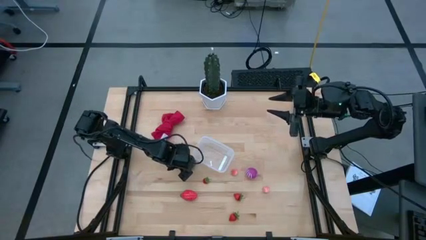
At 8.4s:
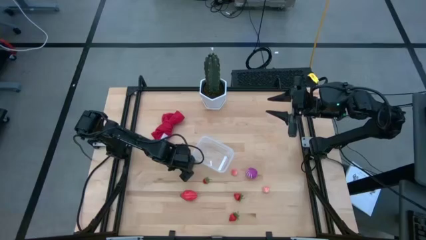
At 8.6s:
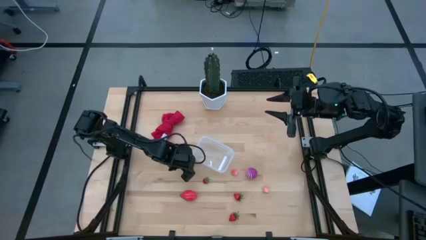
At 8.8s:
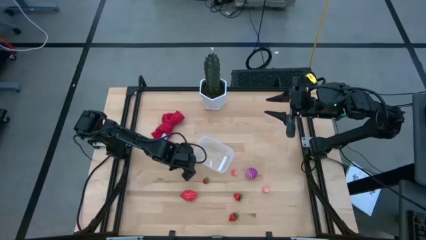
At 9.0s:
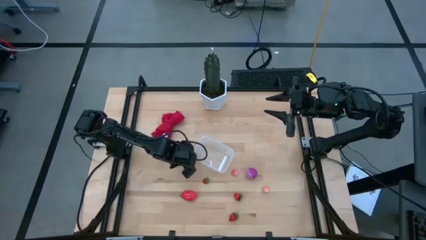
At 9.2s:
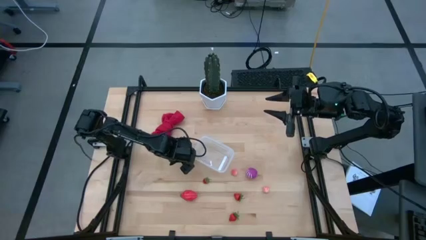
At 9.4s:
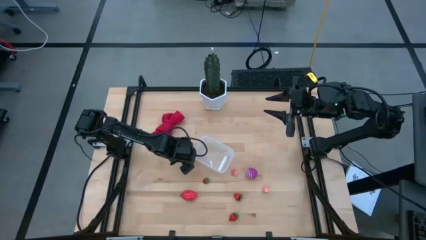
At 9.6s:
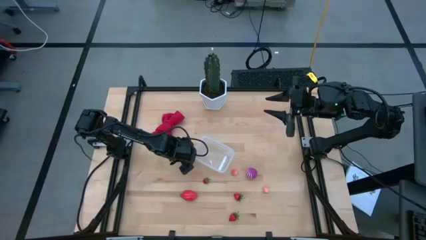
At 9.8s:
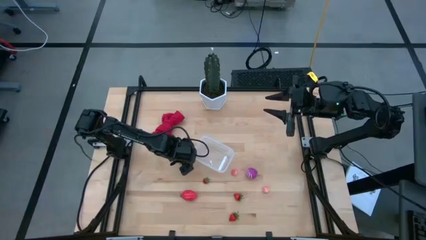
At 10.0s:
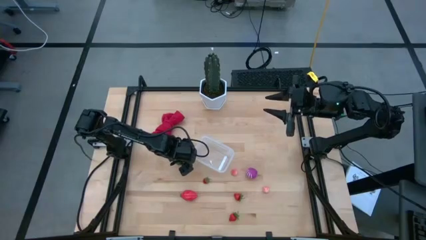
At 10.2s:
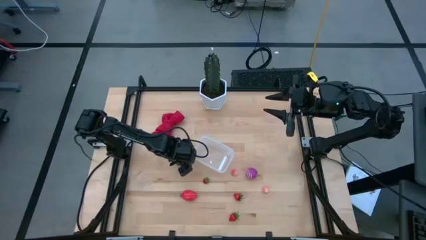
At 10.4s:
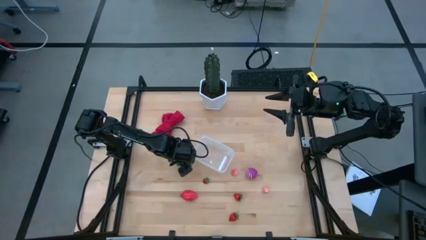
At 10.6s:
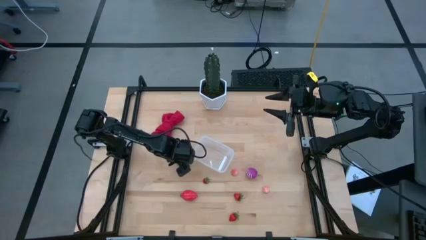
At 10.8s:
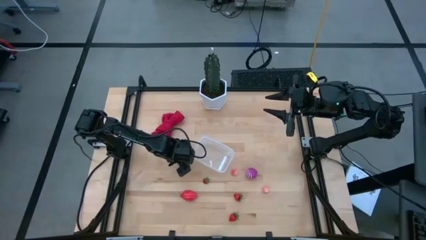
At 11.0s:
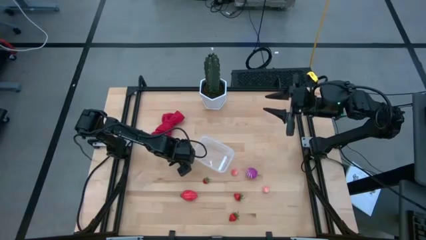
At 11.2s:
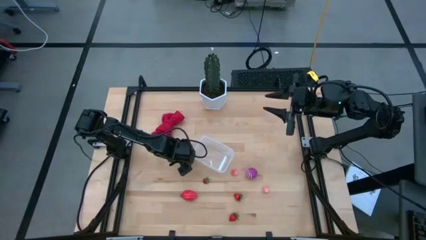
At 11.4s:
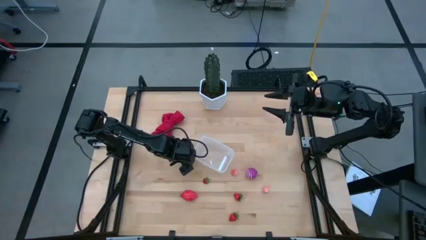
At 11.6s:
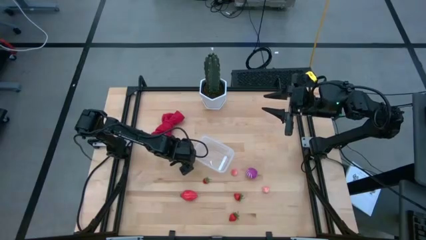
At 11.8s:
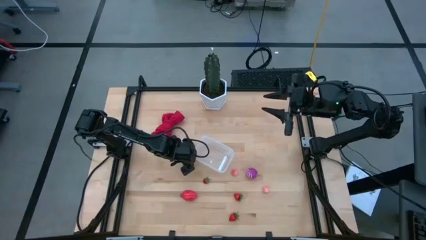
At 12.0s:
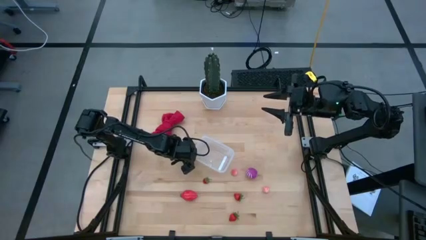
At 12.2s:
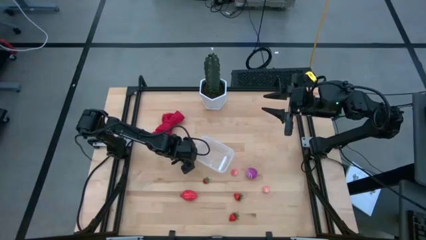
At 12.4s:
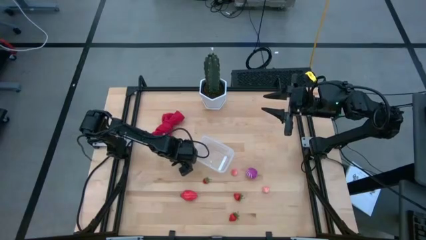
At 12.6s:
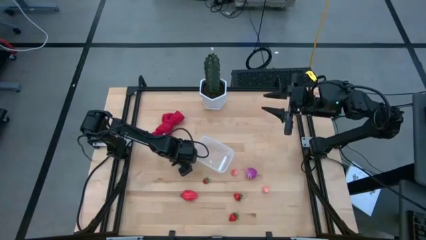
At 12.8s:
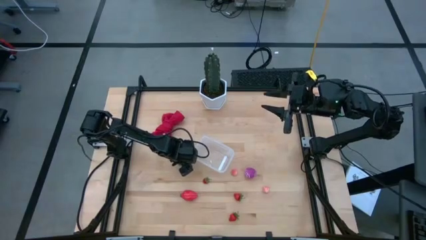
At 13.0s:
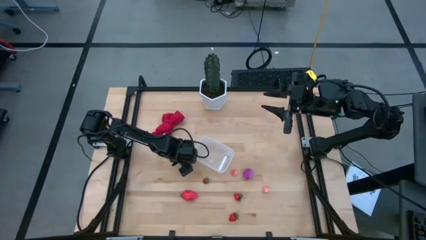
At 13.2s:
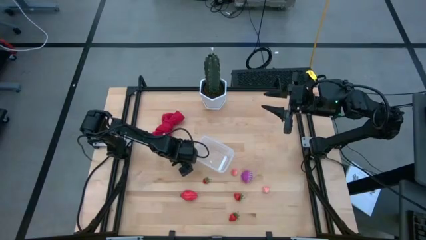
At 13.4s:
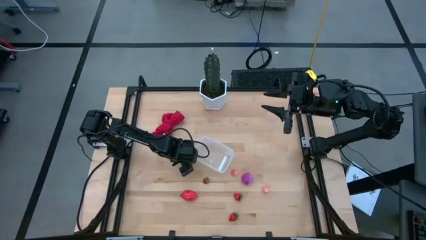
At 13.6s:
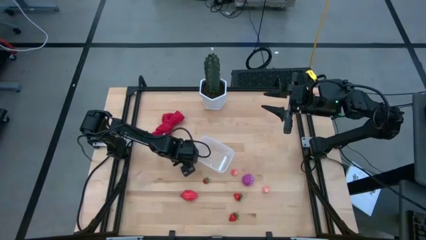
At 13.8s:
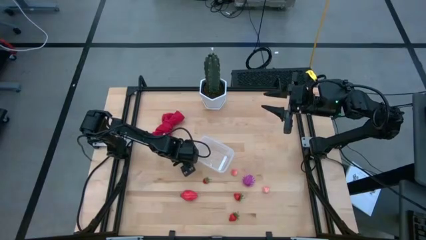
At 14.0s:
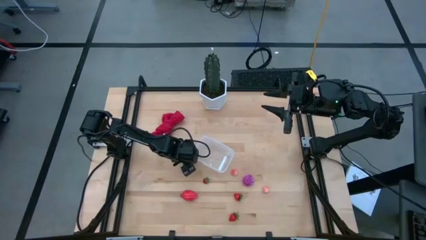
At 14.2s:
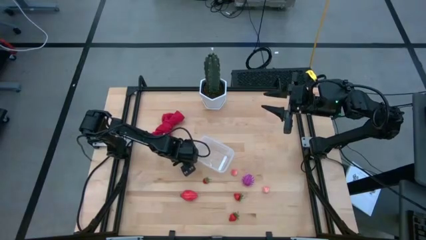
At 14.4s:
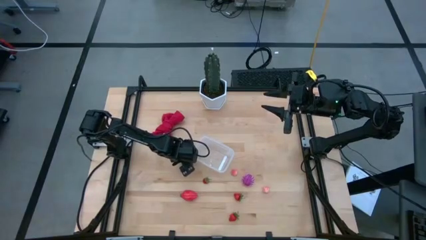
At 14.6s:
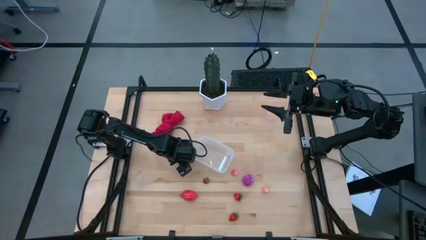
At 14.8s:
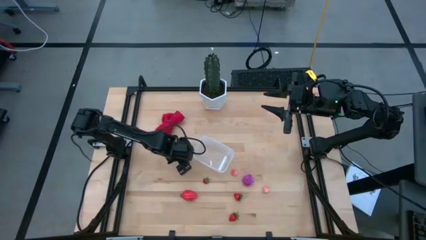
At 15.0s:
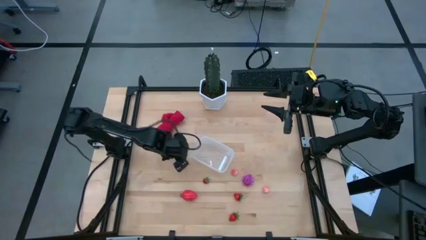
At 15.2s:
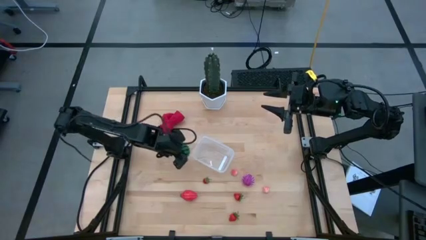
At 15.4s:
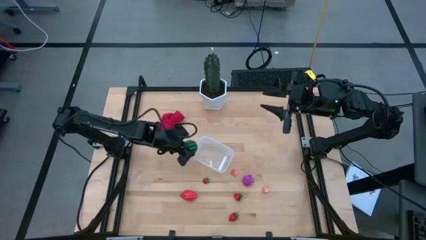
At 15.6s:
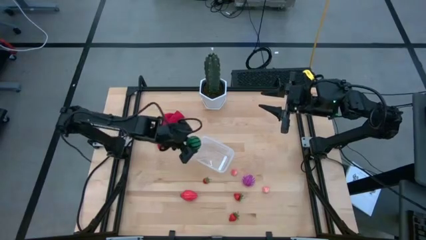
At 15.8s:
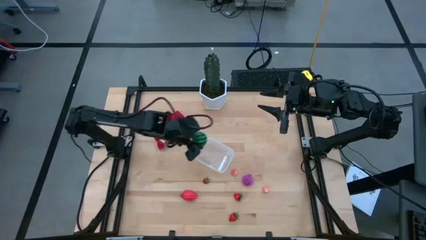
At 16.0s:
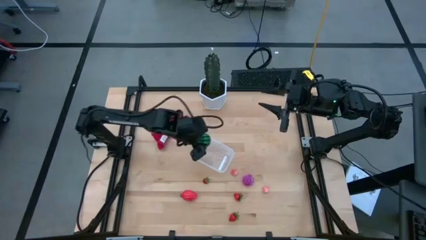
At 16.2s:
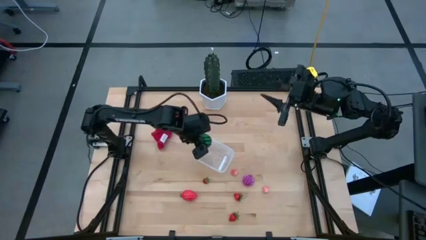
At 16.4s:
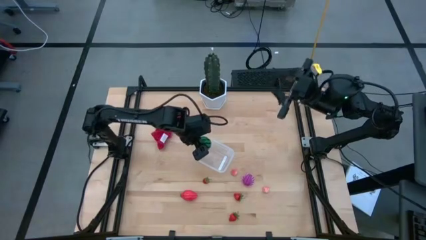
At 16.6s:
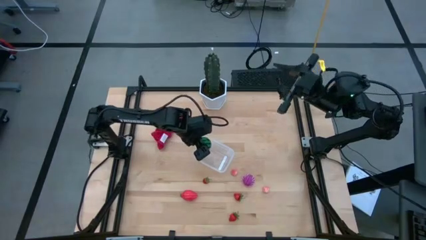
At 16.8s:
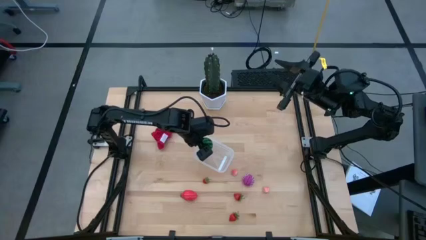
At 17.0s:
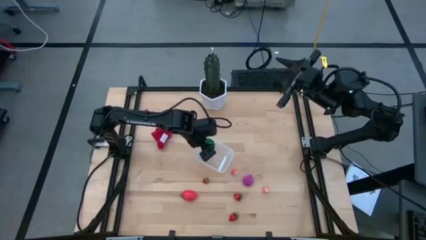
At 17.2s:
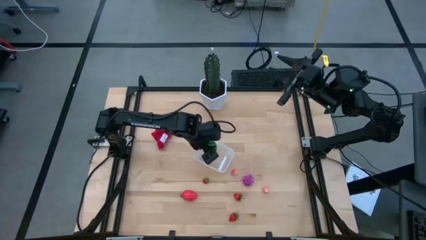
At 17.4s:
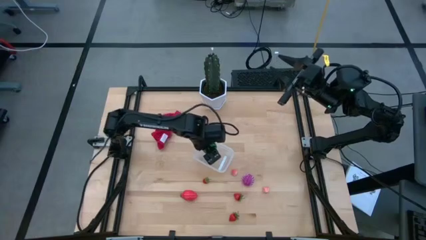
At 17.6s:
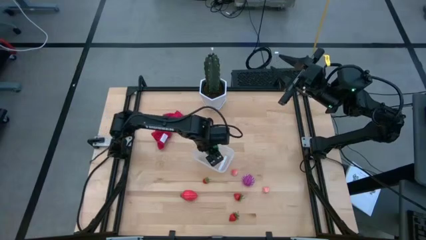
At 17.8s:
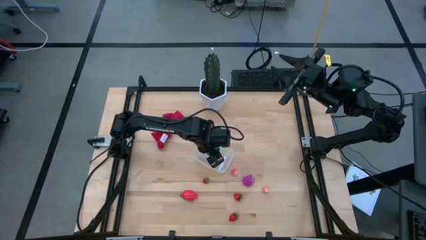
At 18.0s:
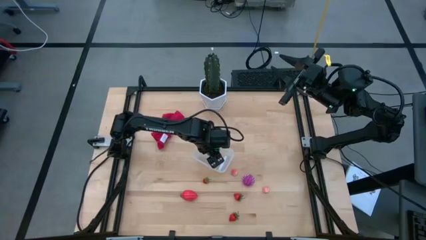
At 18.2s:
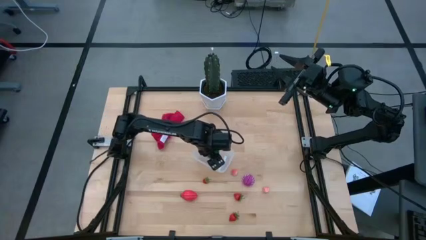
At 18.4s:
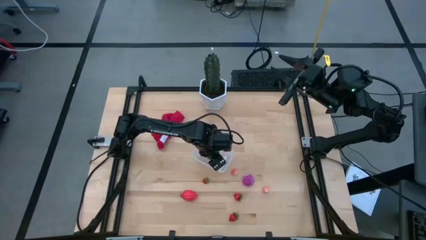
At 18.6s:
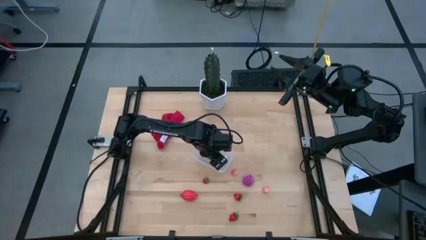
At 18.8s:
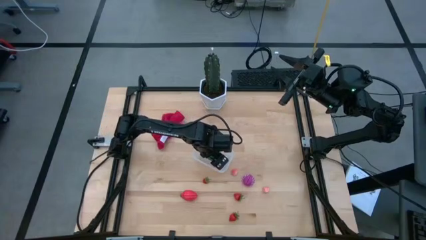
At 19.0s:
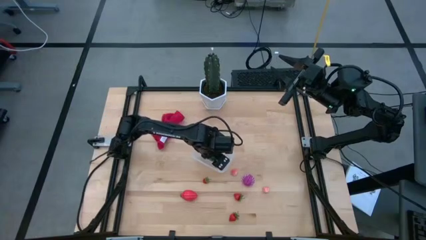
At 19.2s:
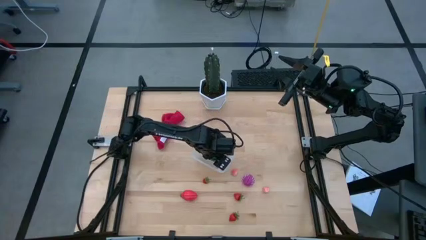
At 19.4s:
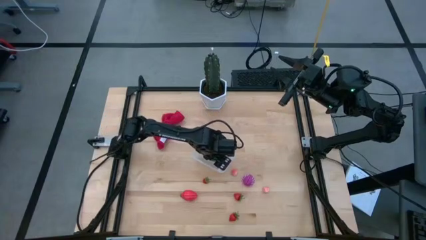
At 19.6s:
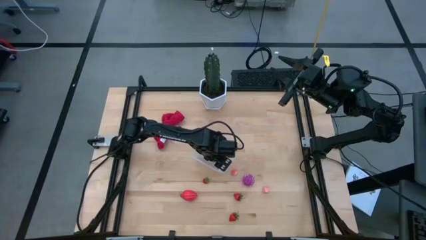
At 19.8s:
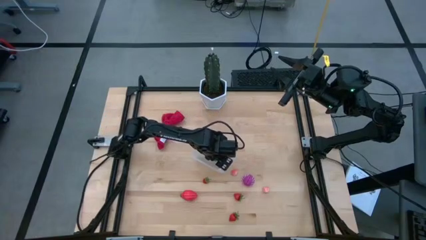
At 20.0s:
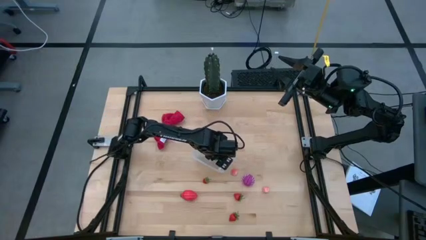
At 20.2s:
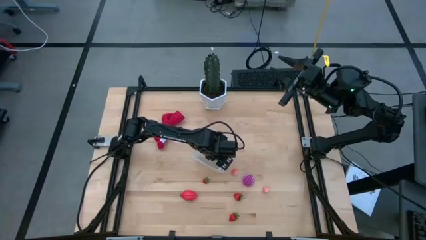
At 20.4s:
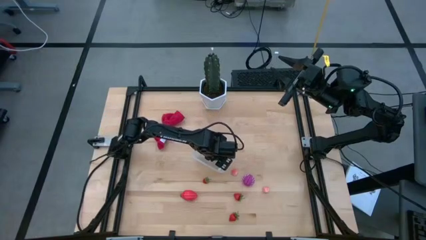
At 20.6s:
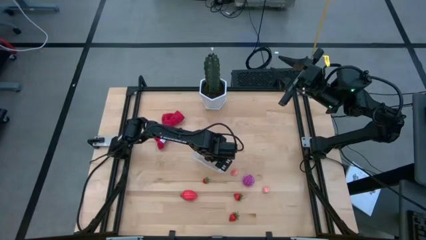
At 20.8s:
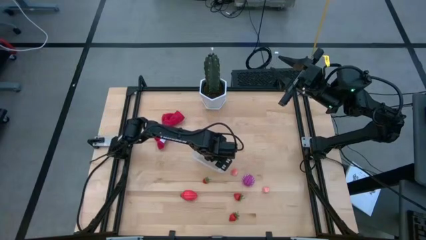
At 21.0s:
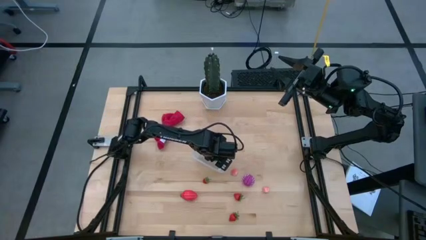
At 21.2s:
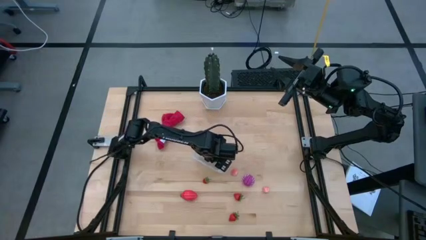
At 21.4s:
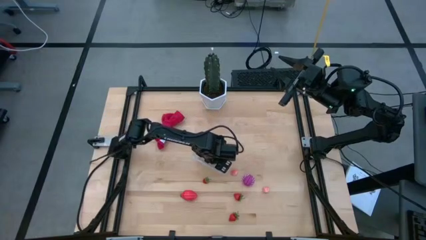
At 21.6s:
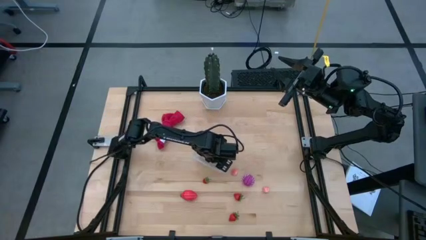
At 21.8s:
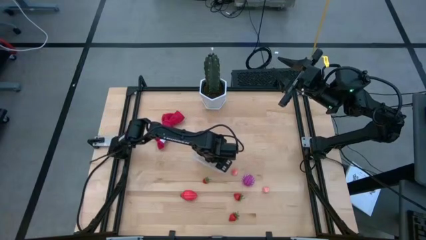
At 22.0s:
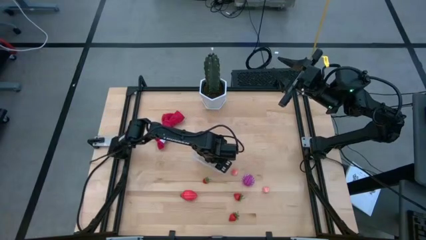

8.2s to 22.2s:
Task: Pick and placing Produce into tupperware
Put the green watermelon into the transparent container

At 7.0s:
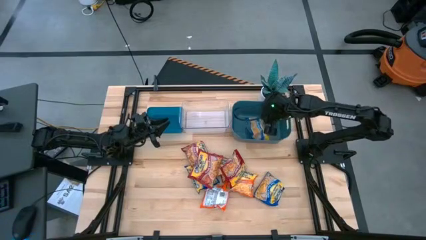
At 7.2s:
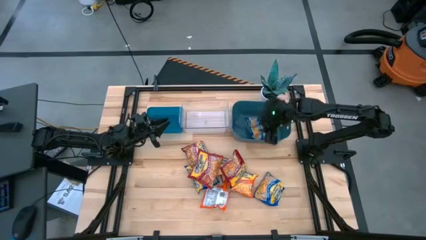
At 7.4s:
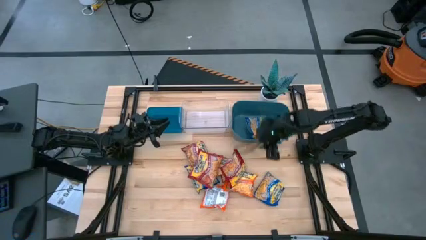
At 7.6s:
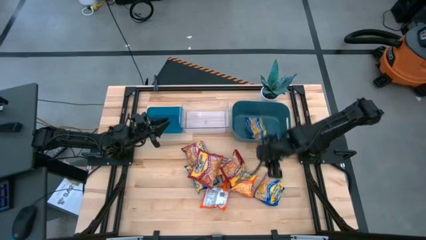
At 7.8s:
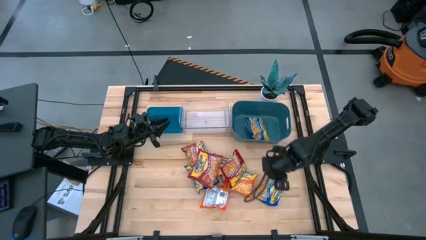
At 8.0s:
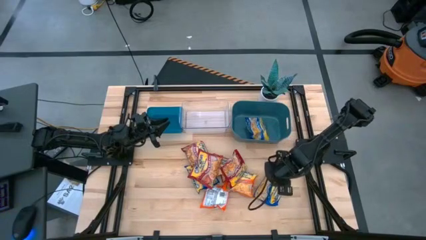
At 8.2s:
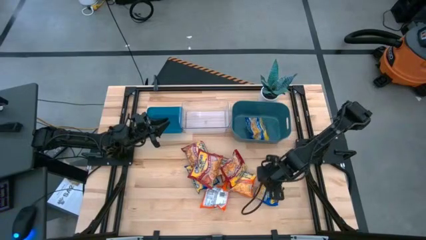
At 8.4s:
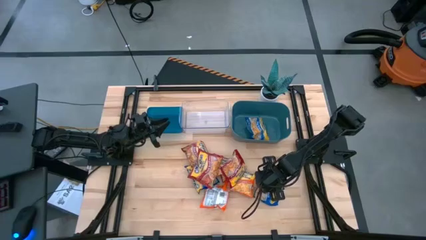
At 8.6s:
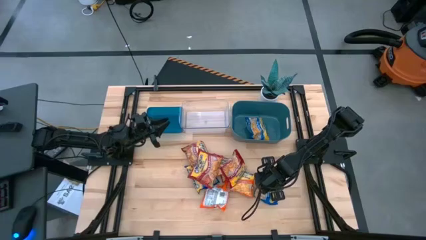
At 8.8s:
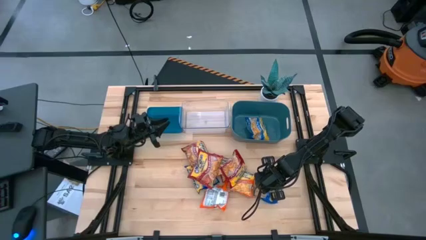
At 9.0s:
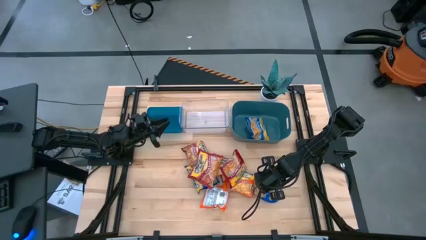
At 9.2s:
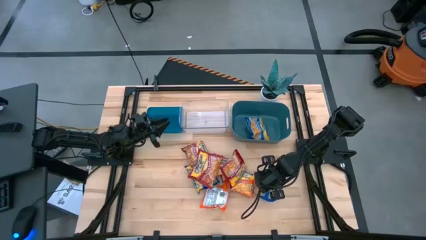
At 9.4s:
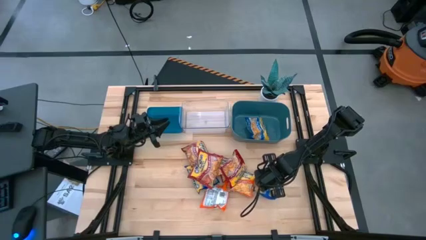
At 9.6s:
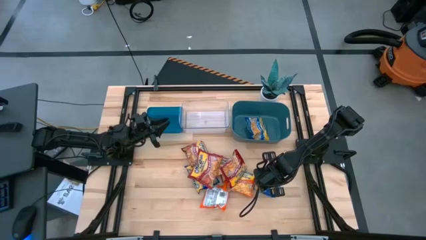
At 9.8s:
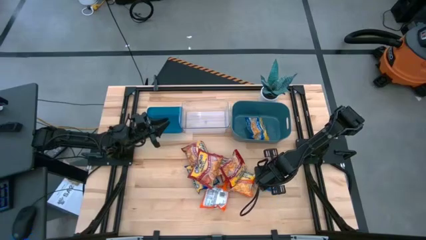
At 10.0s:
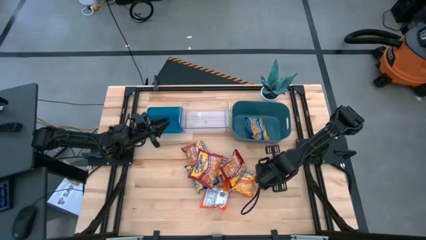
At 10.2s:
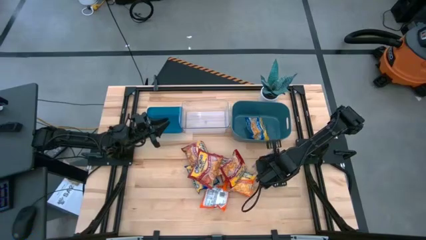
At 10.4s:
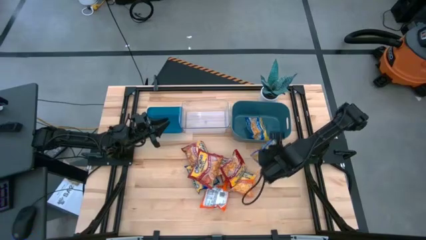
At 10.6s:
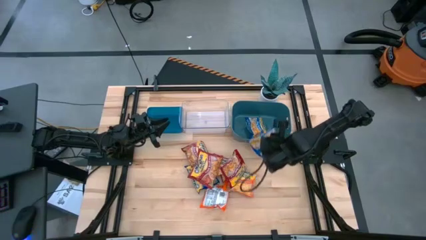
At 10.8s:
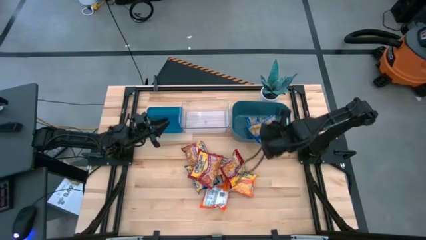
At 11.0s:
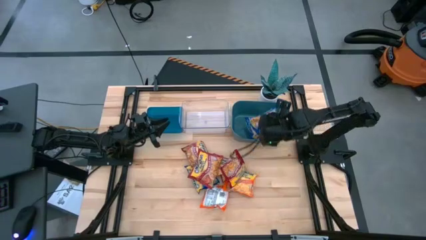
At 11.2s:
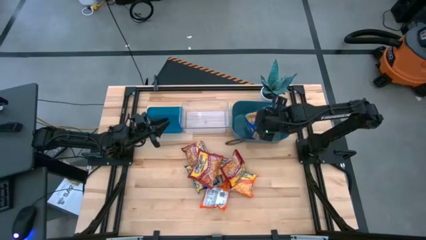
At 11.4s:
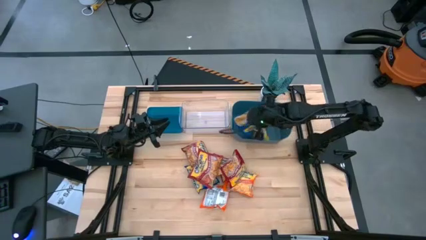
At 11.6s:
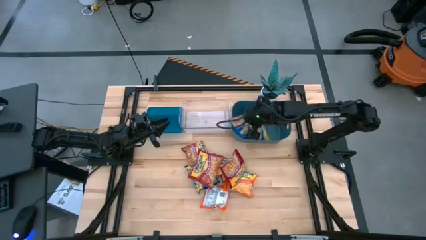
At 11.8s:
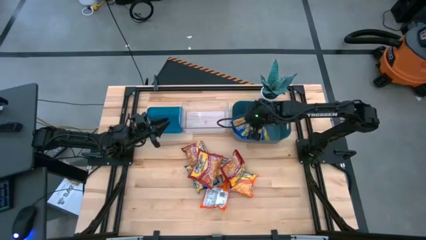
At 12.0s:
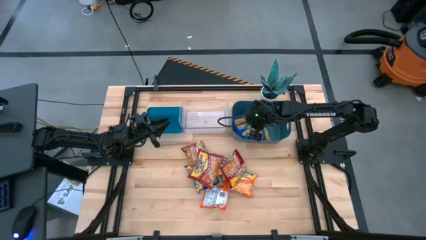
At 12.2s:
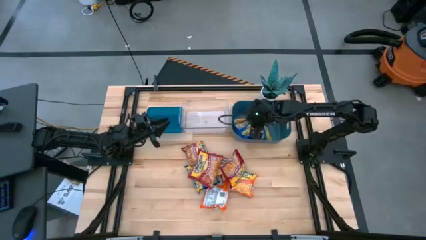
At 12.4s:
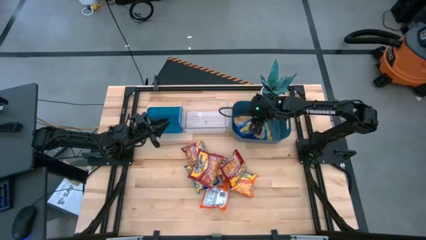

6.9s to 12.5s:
Task: Sort Maruchan noodles
Put the blue noodle pack into the green bin
